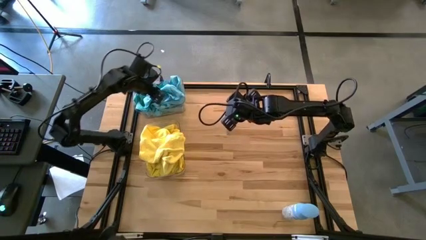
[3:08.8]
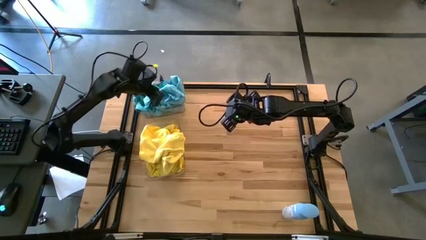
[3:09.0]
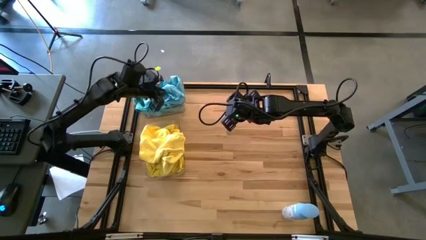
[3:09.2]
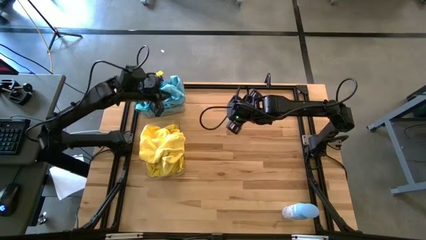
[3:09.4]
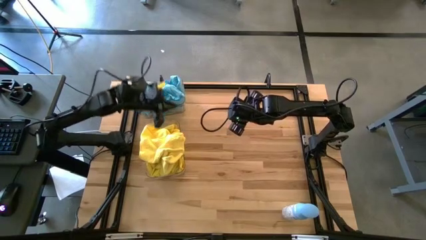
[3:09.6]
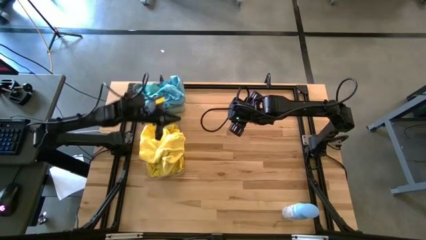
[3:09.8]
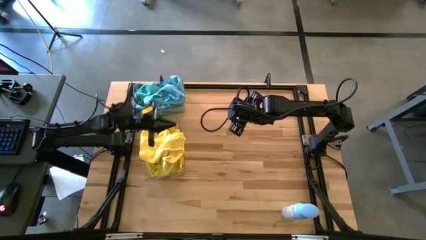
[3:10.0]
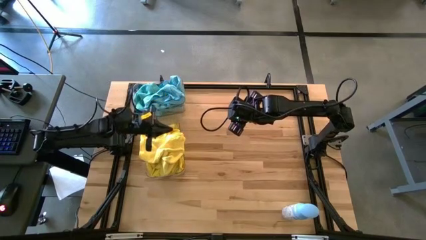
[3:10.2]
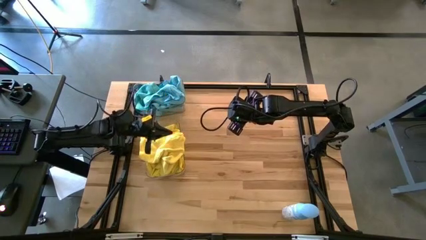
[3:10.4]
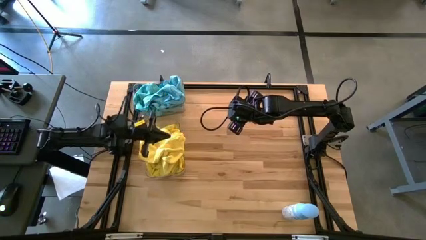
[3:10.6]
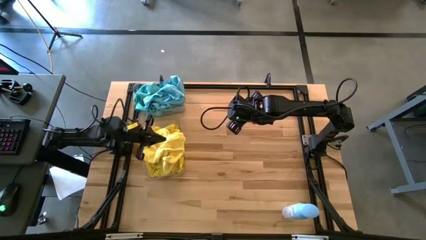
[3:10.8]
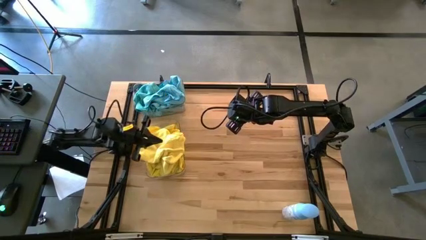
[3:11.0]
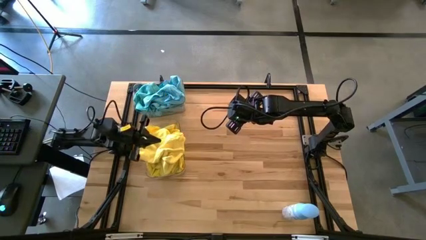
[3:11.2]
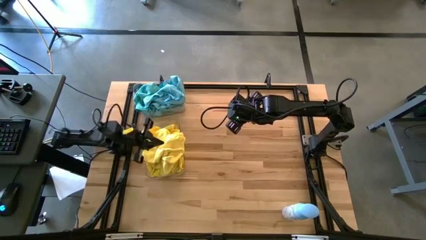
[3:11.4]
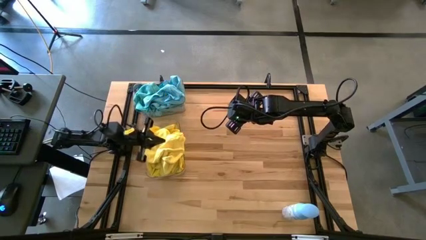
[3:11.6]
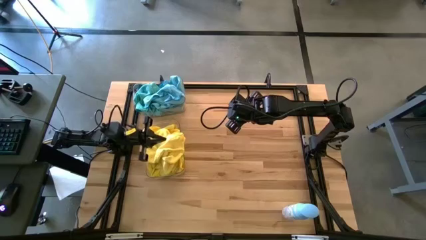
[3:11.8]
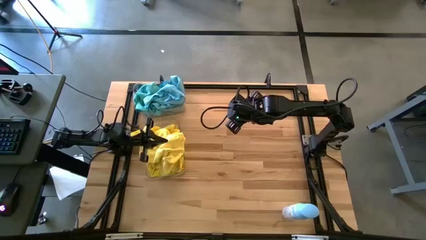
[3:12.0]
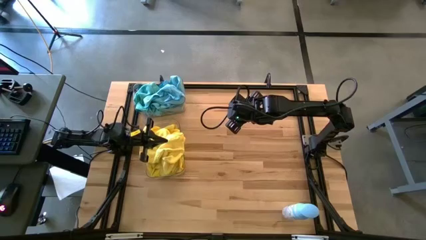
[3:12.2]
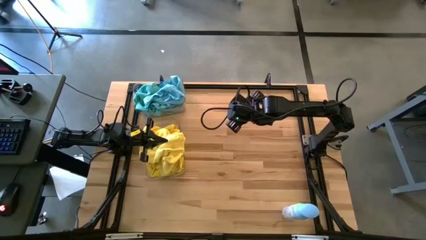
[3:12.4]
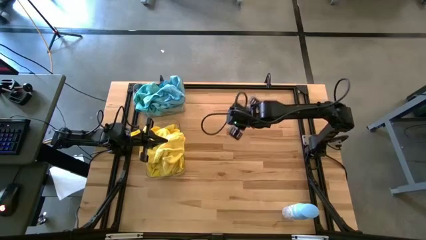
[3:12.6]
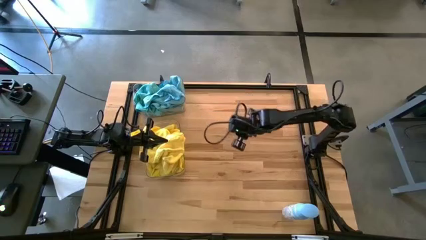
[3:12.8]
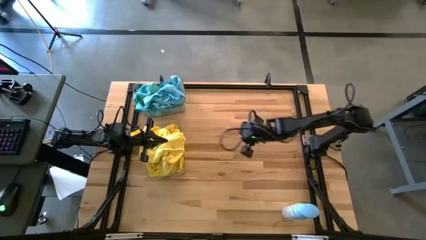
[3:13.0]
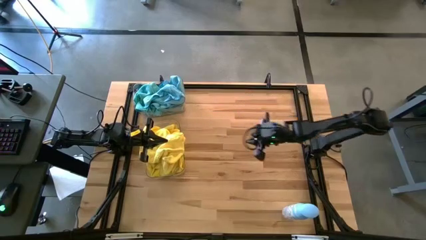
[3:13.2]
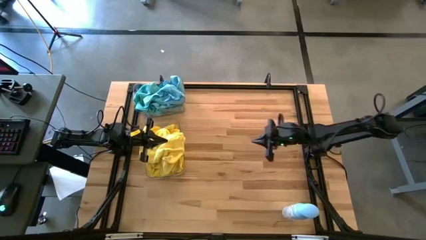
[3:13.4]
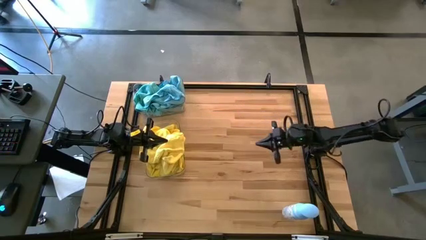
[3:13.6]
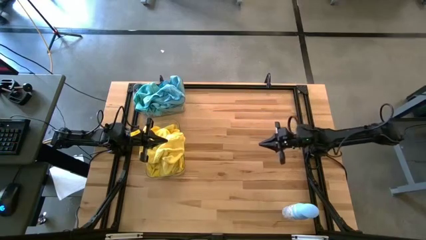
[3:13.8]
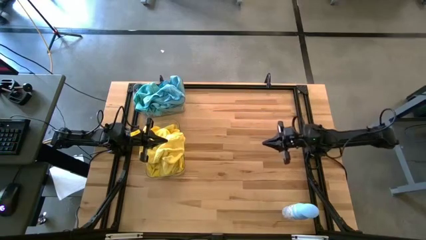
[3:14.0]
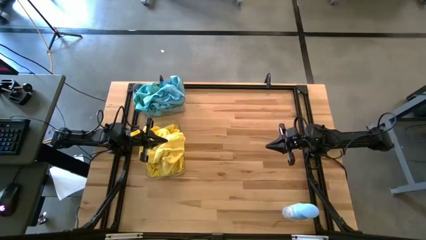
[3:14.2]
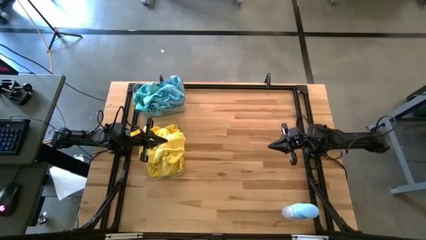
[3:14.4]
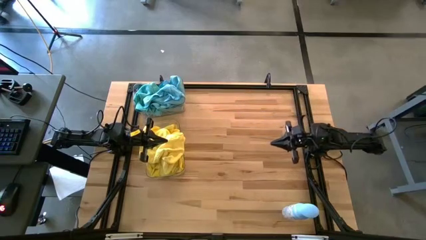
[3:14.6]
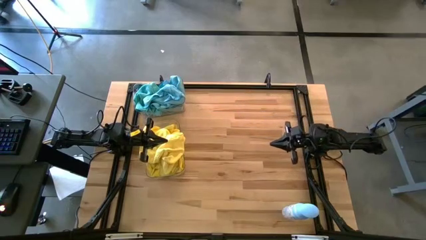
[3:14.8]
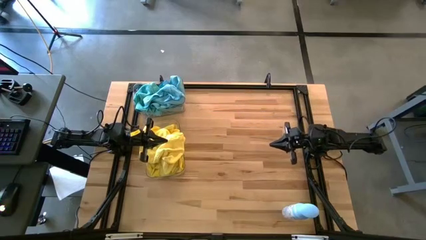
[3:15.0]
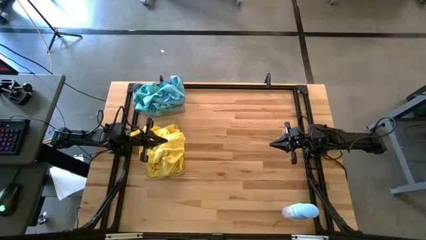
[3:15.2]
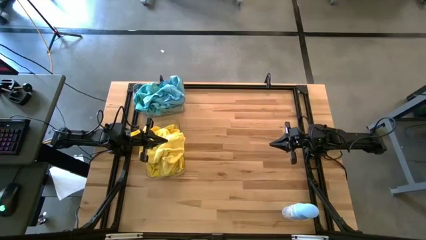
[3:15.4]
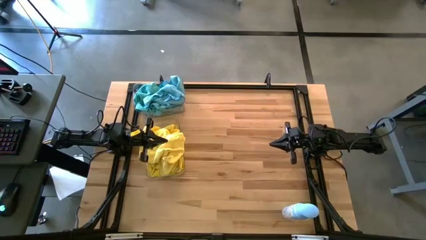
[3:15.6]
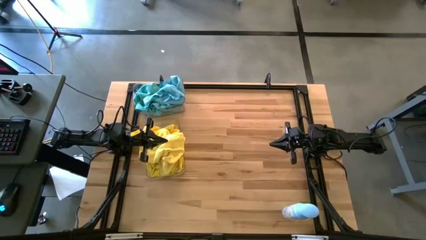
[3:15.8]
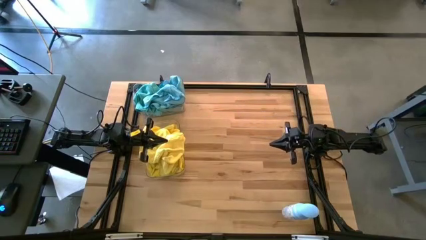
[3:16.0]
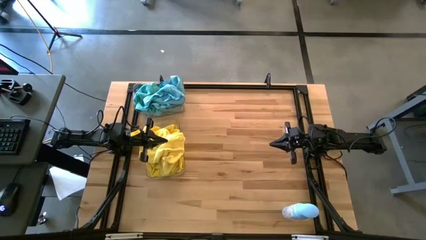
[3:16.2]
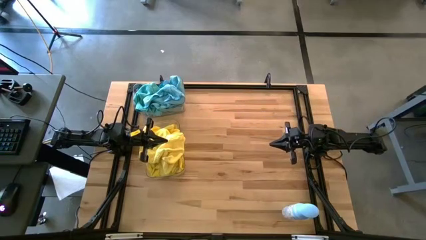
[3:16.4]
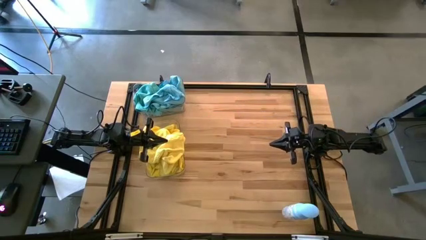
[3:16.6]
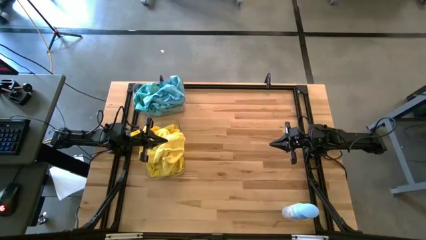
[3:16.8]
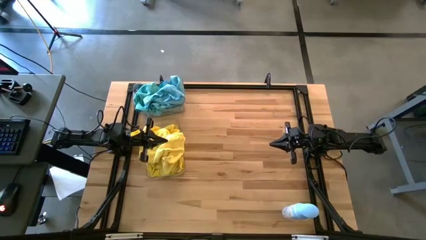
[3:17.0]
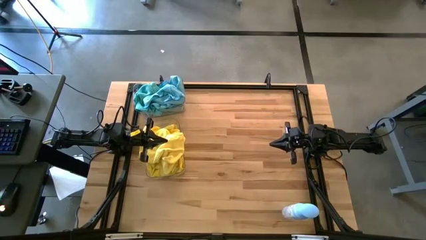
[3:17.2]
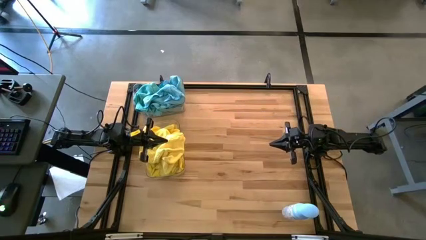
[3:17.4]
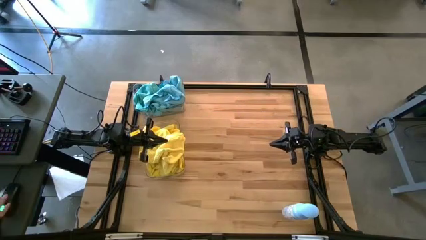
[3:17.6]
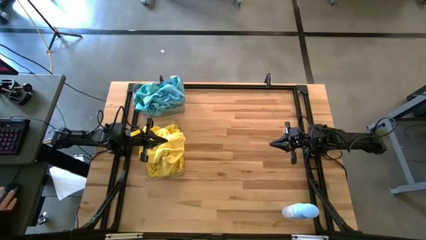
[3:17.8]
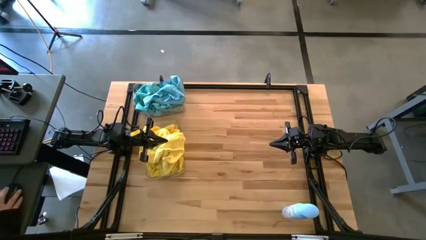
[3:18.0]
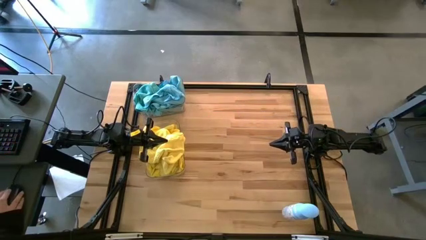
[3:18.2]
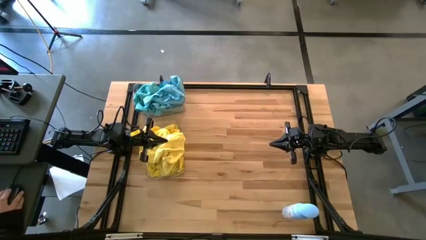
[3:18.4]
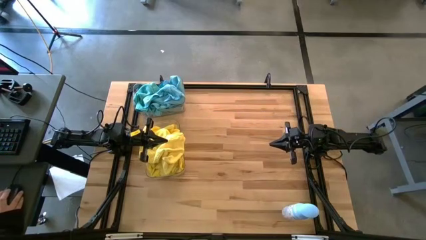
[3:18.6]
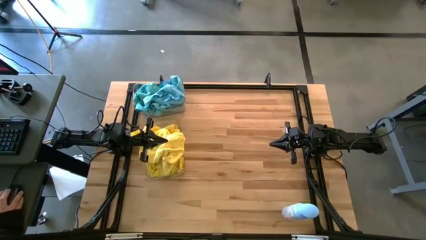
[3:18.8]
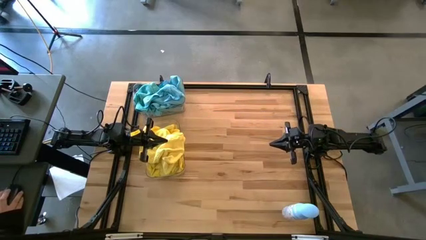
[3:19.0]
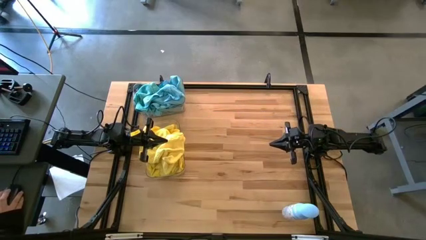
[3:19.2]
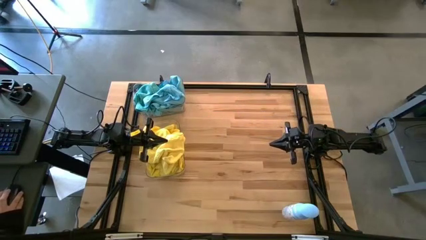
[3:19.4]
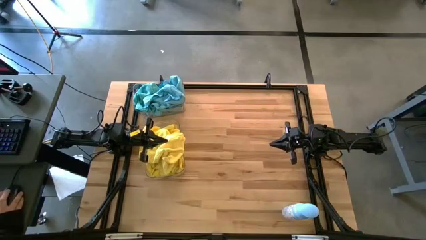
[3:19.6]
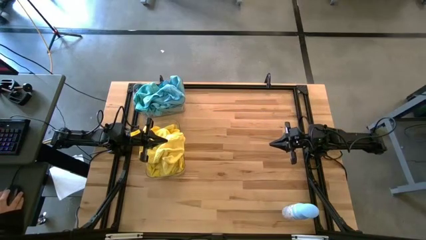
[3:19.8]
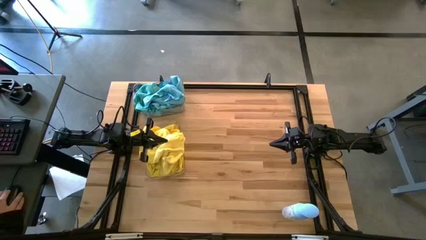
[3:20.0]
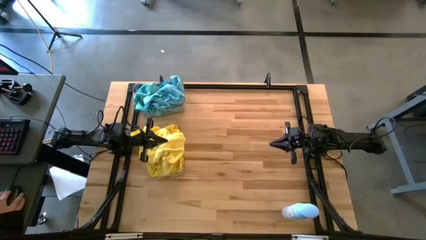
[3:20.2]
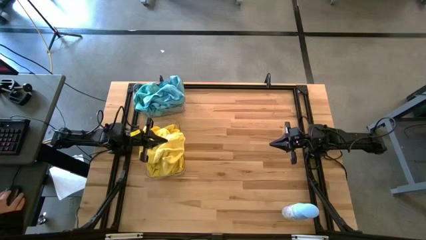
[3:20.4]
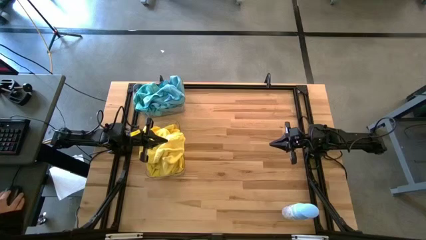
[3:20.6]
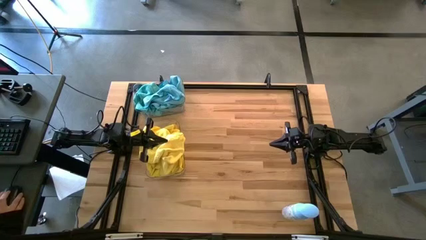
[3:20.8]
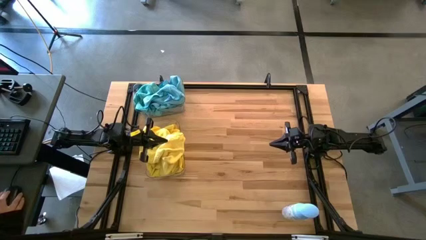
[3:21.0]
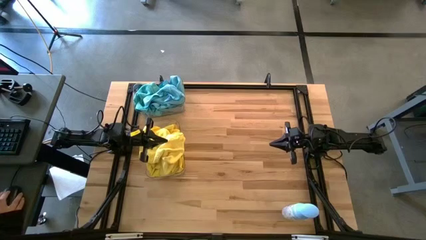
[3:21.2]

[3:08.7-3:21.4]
Task: Sort microfiber towel by color & place in baskets
Return to Home Position
